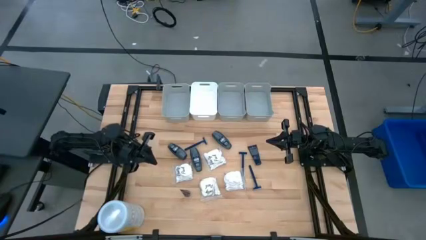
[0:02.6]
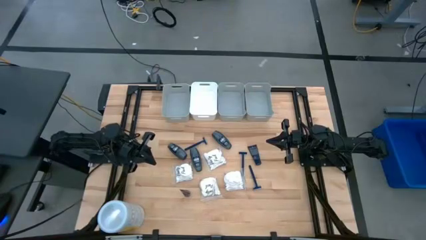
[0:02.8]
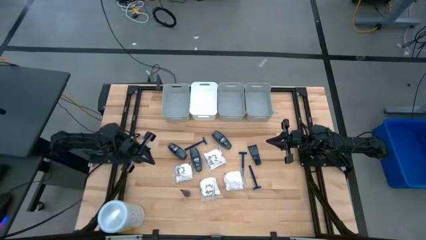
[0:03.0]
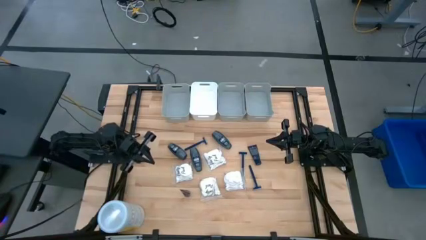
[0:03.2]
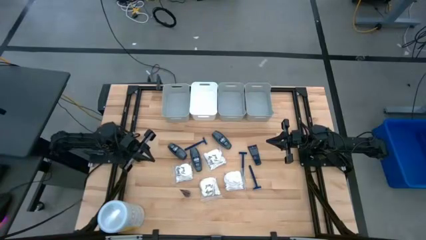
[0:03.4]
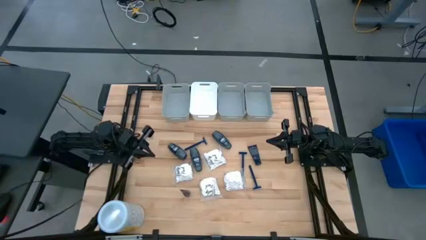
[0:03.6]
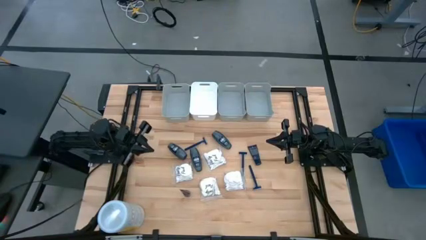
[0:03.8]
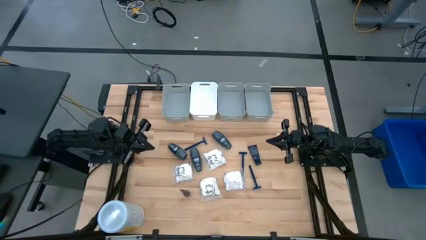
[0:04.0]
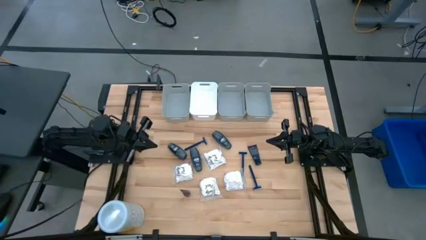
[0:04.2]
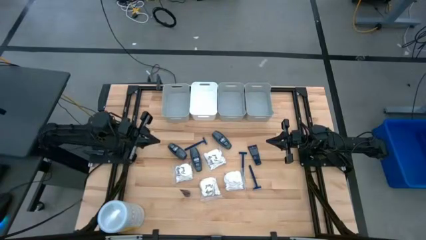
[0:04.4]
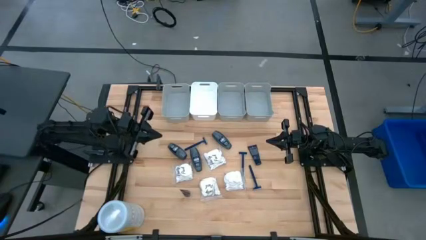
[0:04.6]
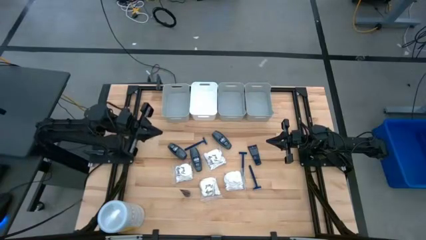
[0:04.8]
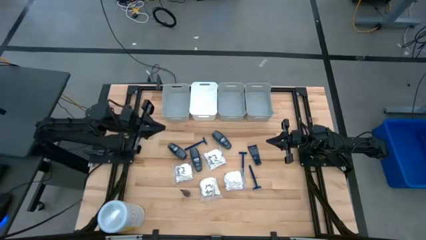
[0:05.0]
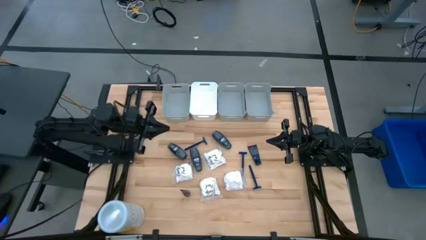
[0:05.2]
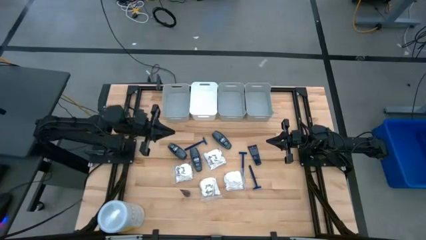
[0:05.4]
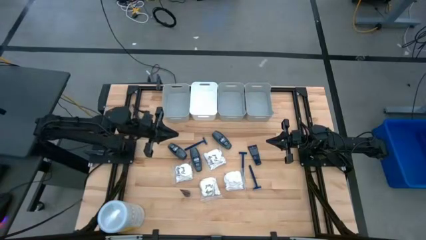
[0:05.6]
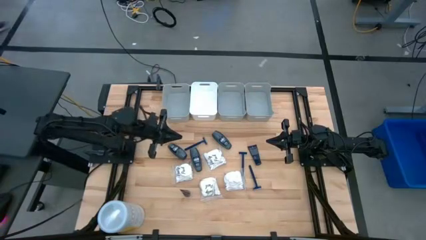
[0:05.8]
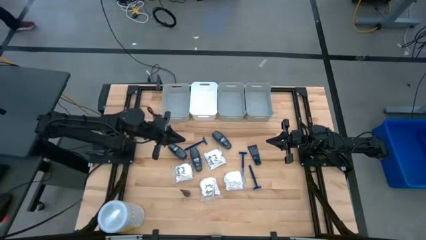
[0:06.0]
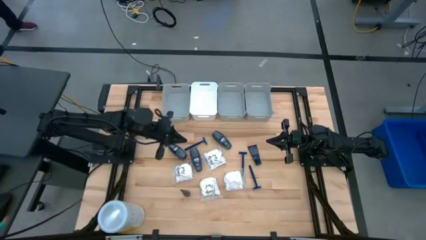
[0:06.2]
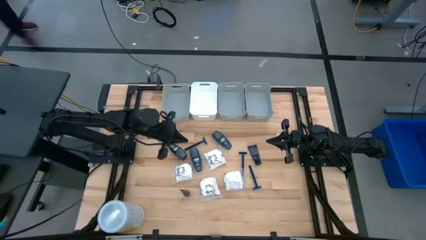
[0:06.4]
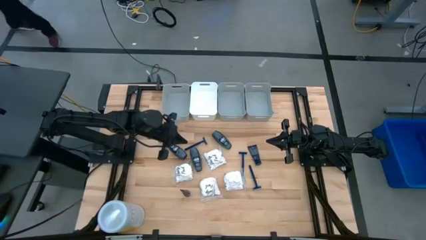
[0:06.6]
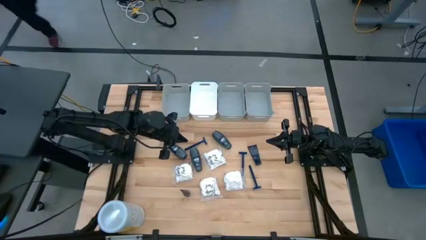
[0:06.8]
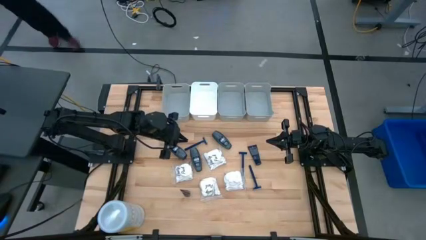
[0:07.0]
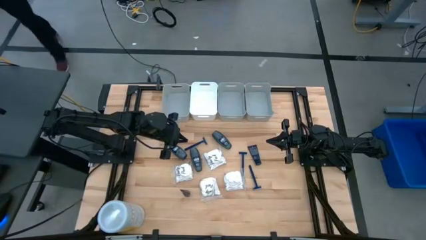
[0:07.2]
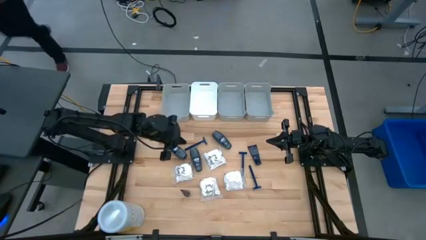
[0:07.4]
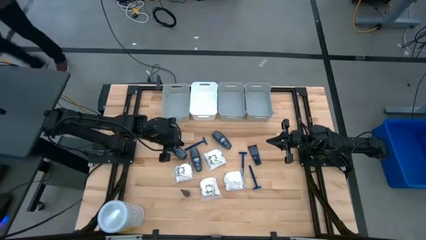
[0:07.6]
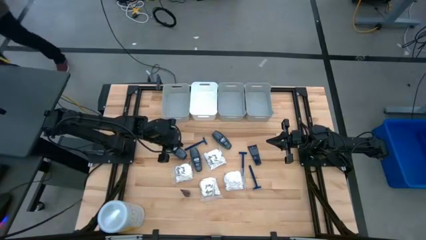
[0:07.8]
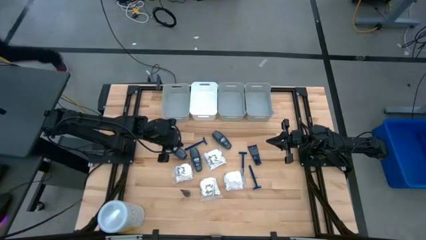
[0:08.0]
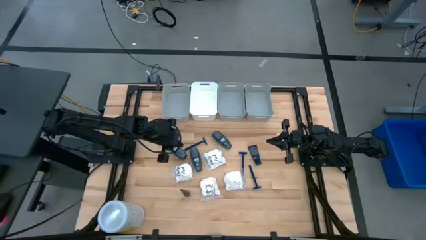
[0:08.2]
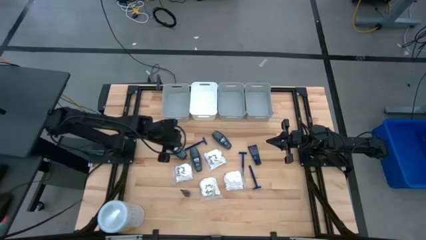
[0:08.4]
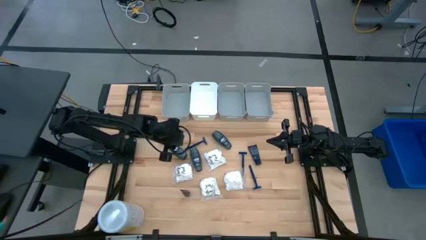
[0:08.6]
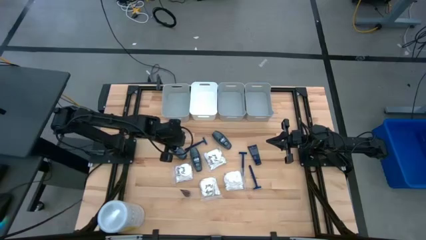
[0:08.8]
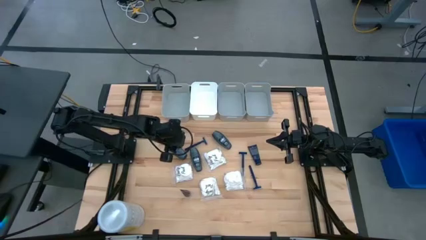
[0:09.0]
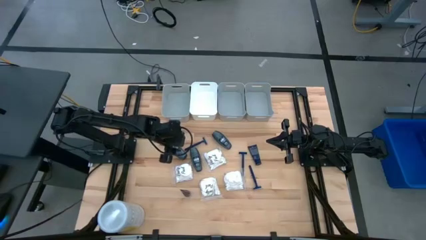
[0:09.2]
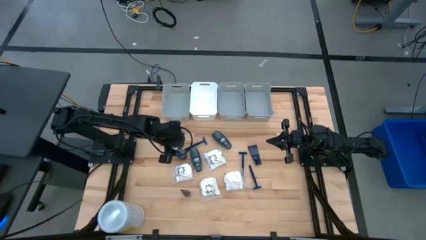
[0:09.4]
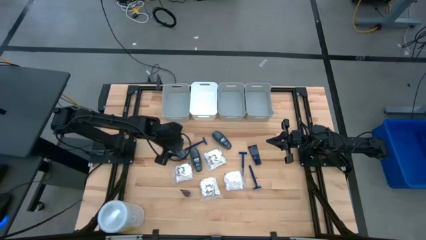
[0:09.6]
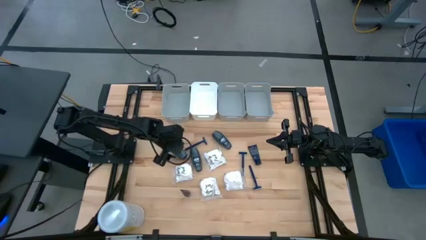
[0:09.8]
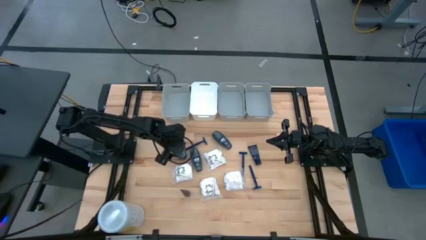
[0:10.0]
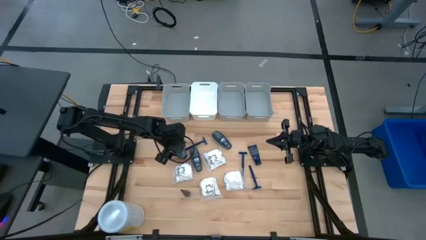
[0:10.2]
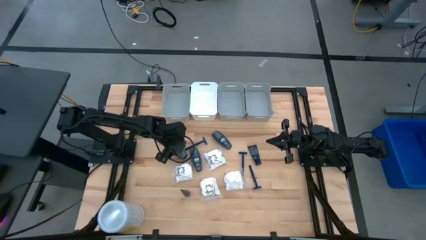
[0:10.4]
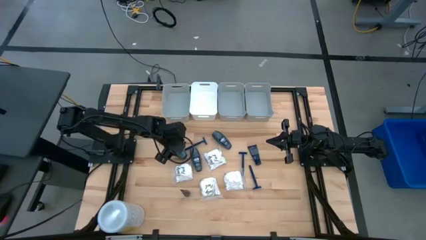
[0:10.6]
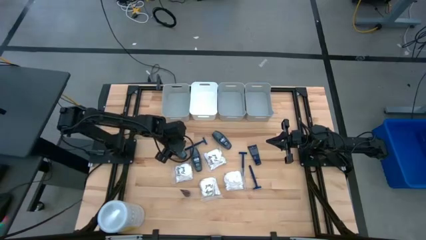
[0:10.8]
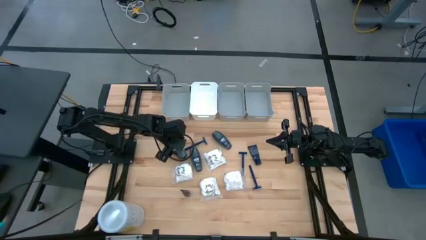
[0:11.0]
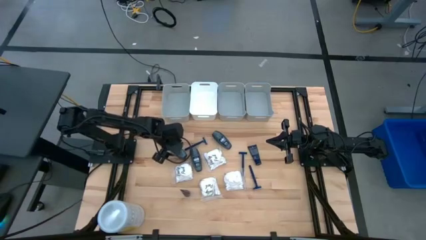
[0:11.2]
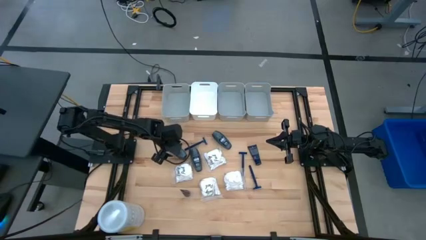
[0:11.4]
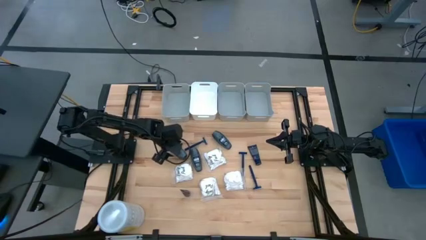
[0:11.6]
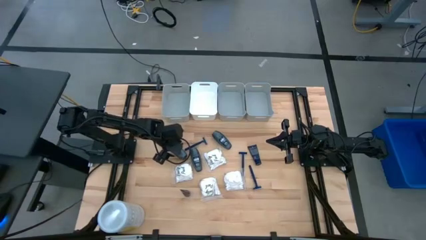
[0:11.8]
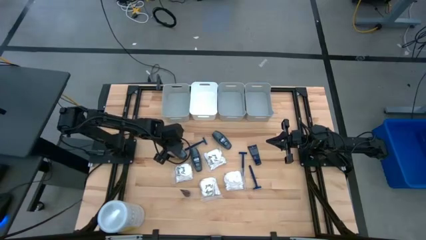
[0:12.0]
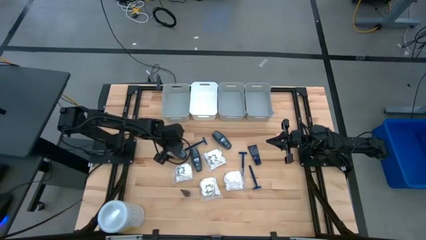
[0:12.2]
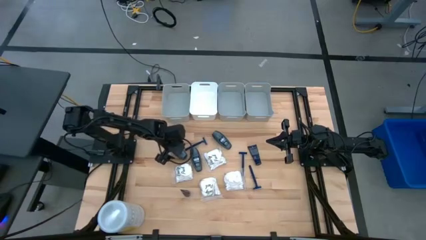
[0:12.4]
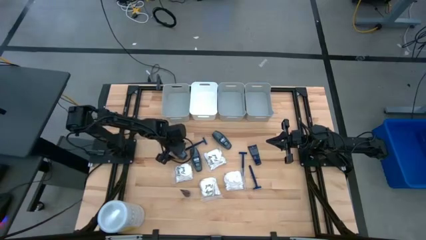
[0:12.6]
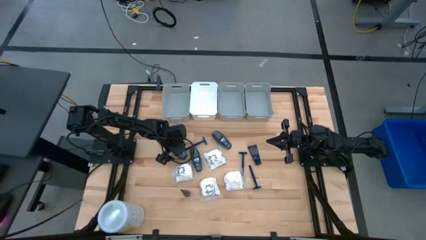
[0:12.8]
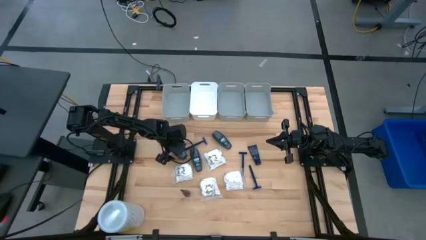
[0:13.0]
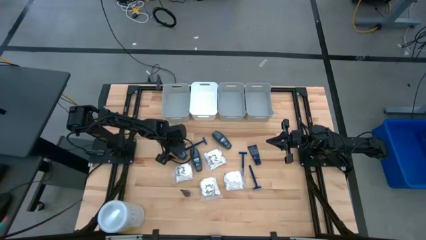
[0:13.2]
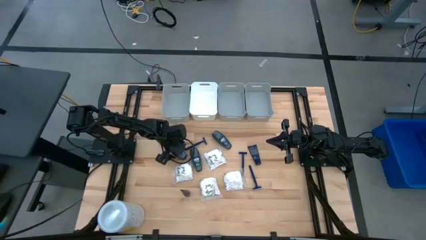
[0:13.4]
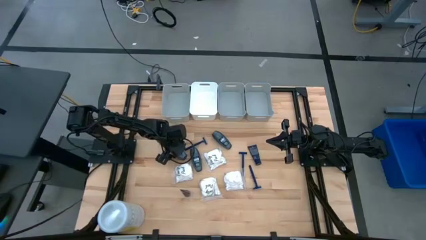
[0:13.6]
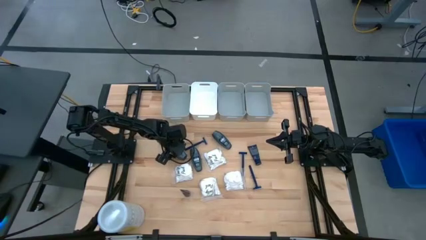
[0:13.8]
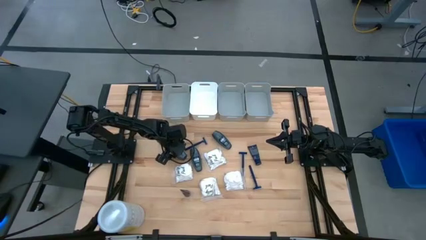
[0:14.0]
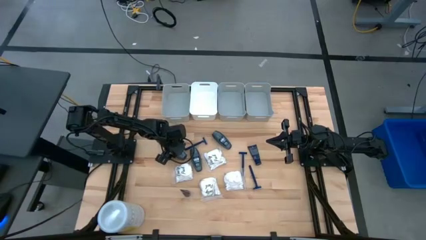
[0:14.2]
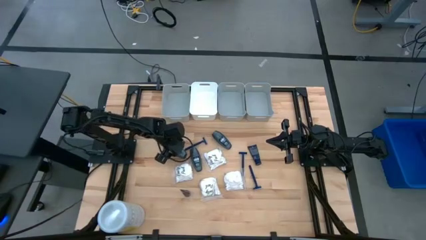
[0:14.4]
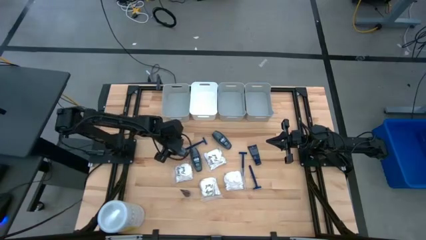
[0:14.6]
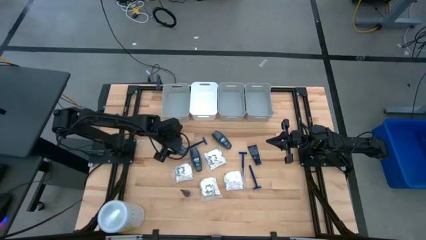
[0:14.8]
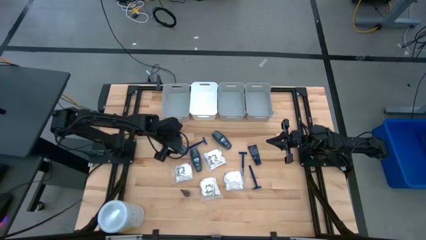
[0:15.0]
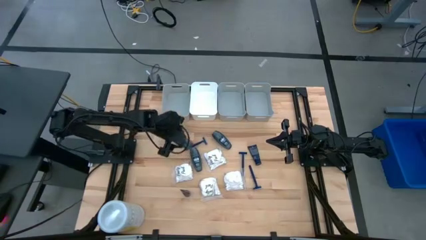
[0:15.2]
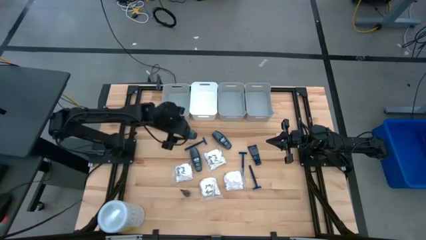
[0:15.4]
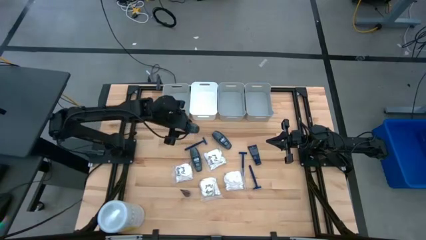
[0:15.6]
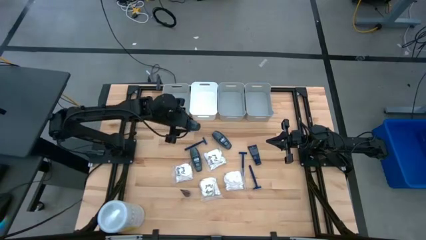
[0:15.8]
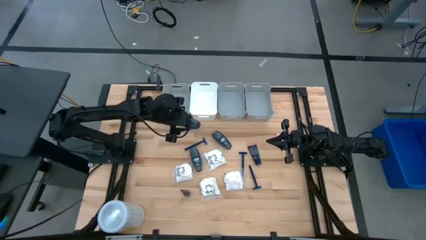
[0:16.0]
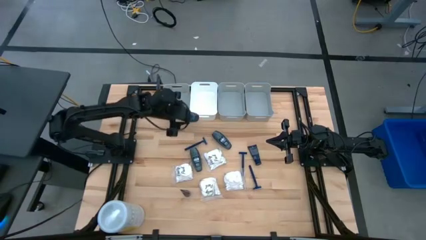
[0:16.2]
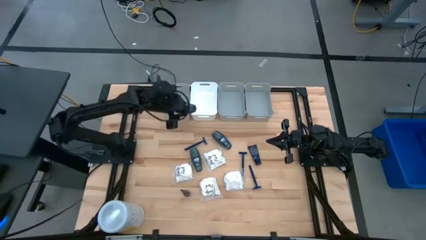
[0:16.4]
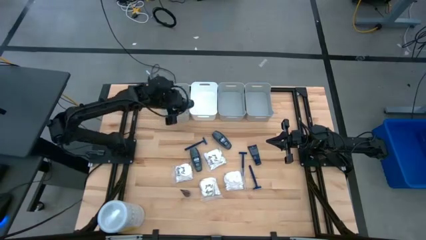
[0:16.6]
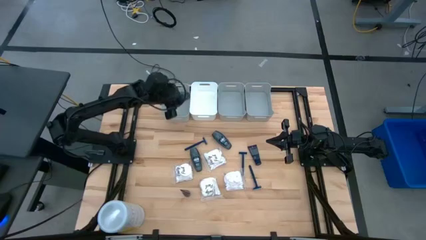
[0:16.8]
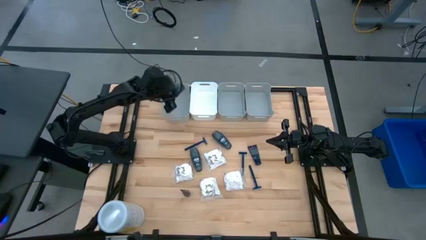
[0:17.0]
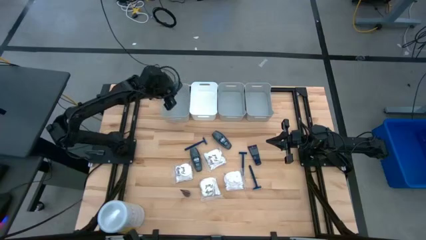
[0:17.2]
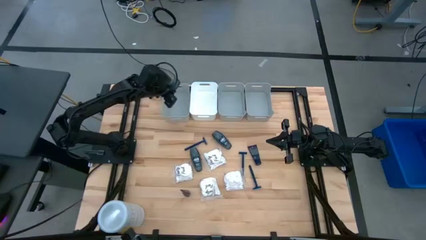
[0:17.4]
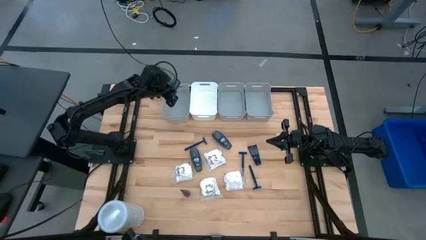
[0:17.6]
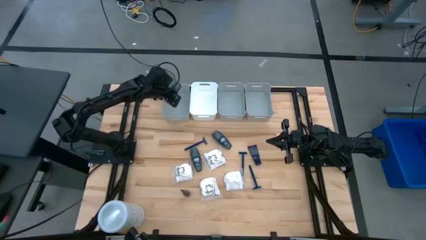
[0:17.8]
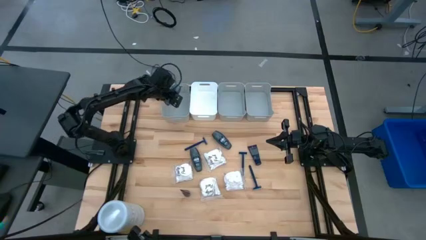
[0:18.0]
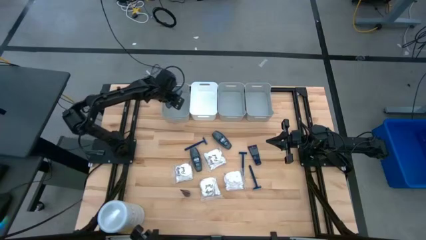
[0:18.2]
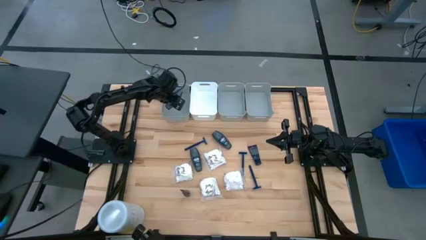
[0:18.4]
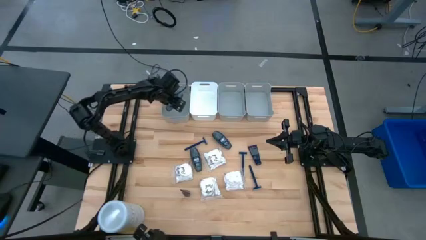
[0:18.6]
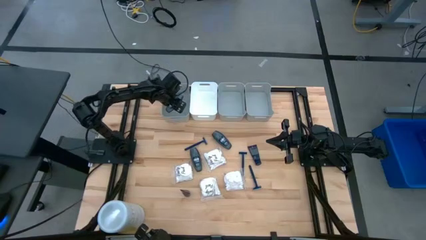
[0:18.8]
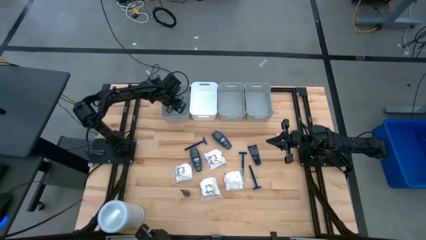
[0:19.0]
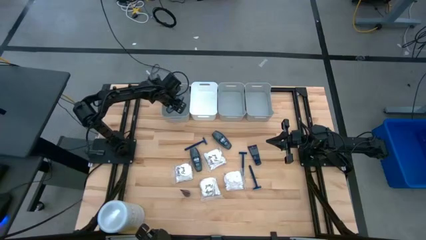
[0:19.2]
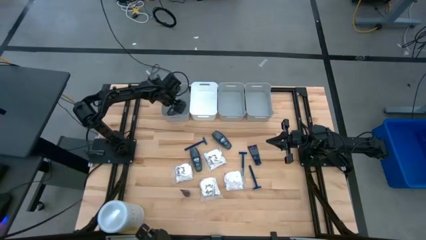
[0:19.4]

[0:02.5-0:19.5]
Task: Pick & Place Travel size toiletries
Put the gray deodorant into the left gray bin
